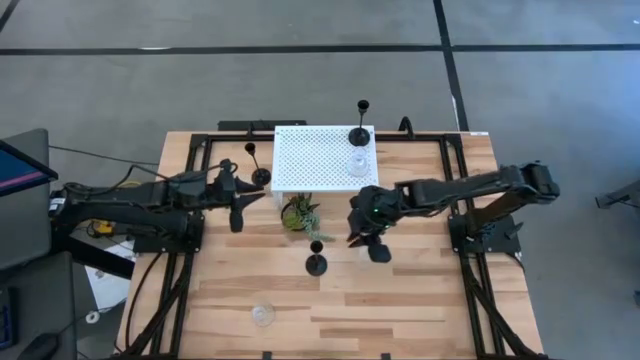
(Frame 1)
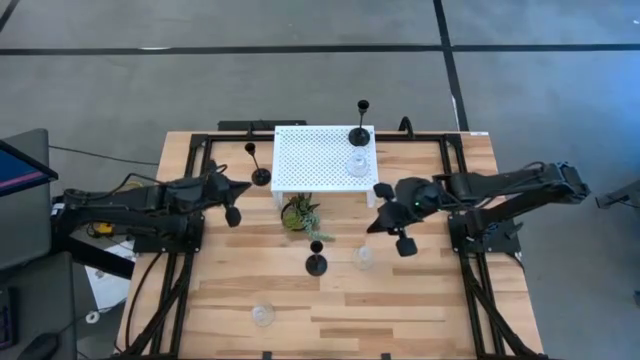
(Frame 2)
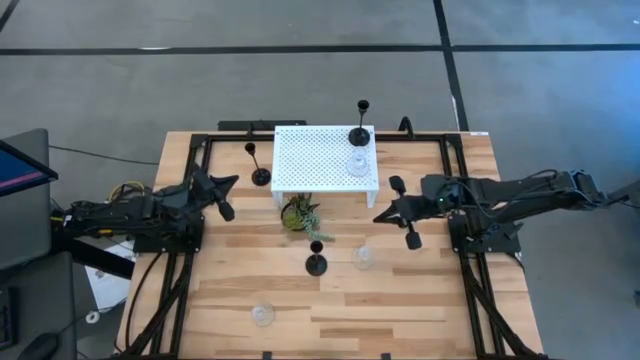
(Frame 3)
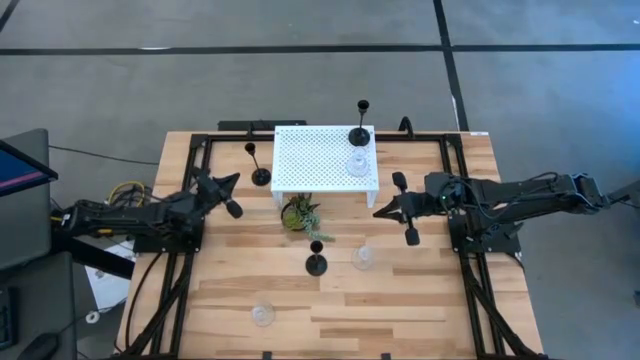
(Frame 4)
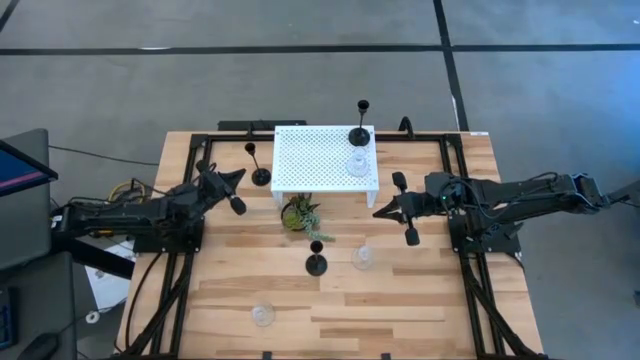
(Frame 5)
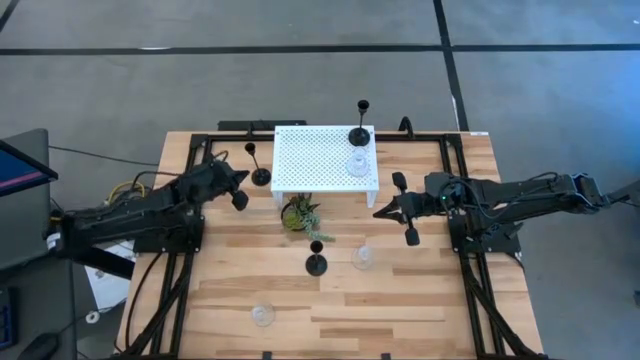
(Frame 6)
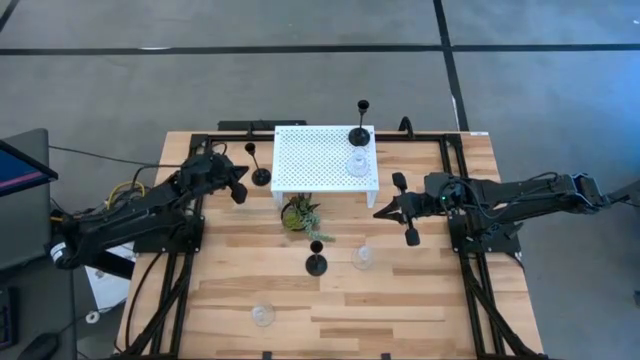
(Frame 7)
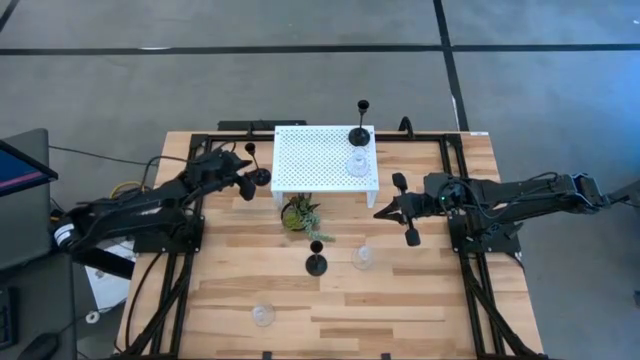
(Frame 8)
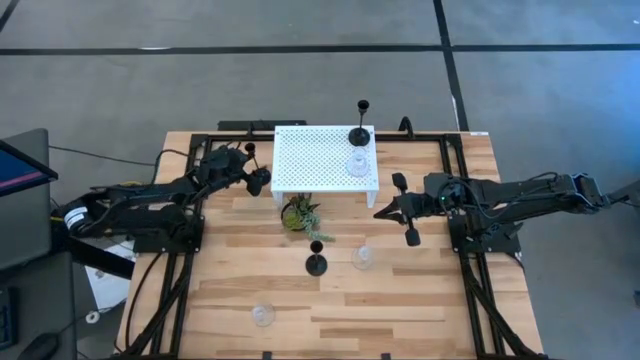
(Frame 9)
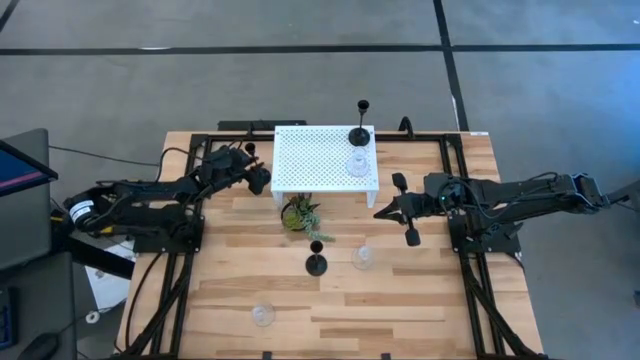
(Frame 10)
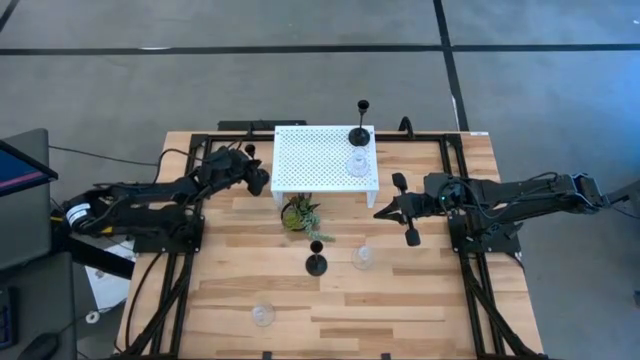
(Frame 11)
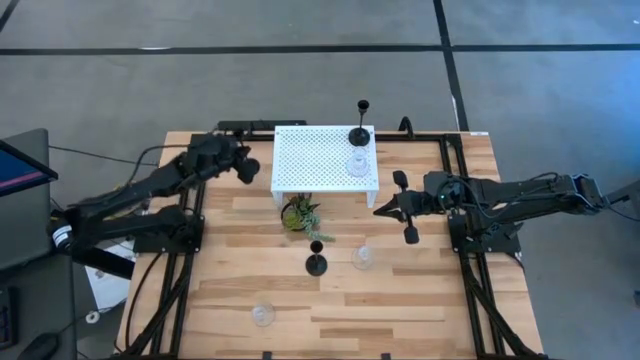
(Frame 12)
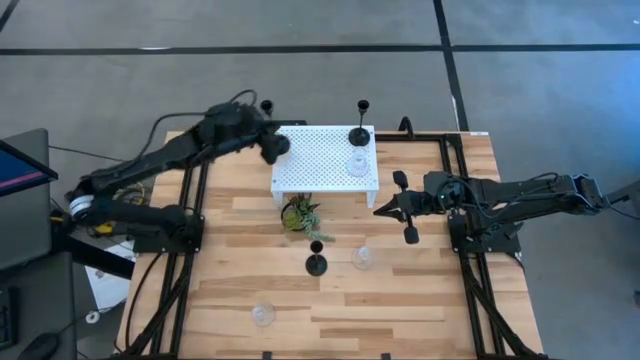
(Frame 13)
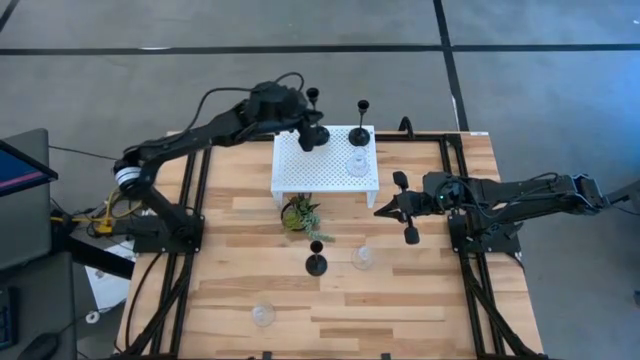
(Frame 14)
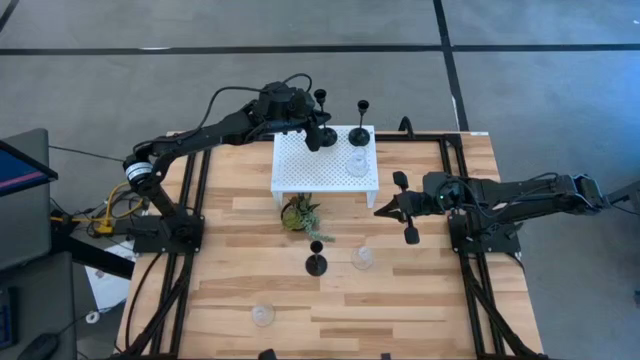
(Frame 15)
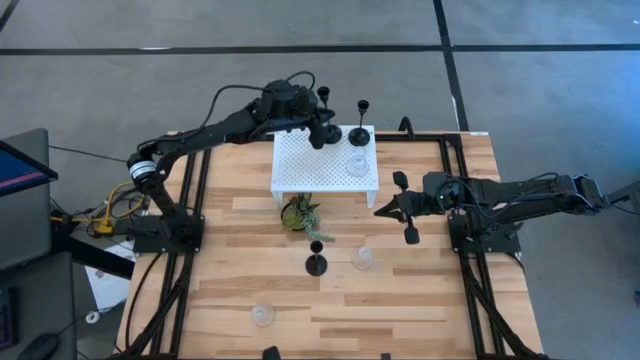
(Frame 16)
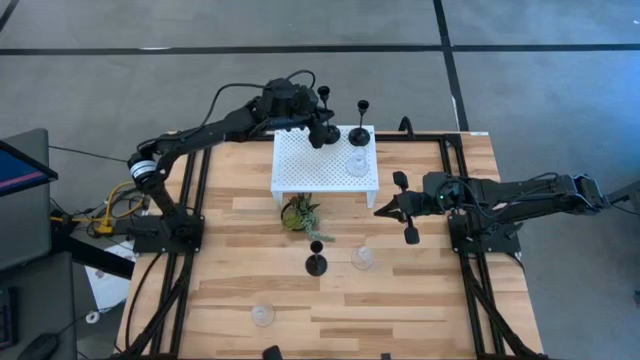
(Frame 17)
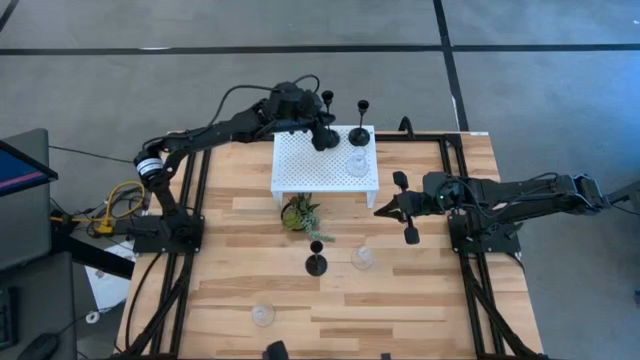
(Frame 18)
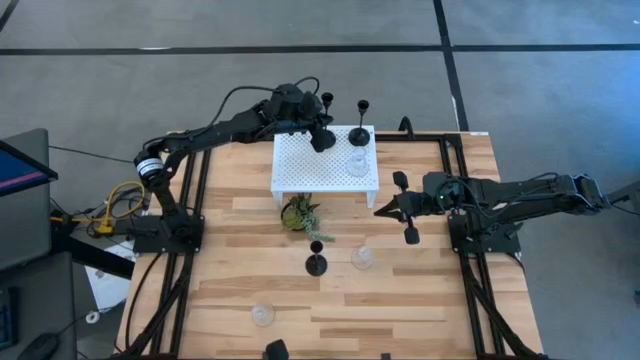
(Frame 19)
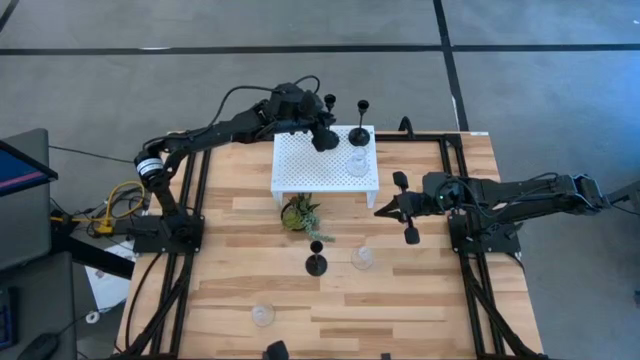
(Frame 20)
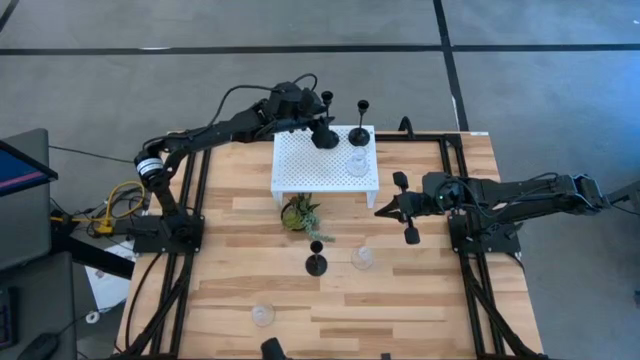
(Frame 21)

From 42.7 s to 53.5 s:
Task: Pick & Place candle stick holders
Put the top black candle holder on the shelf aligned with the black candle holder

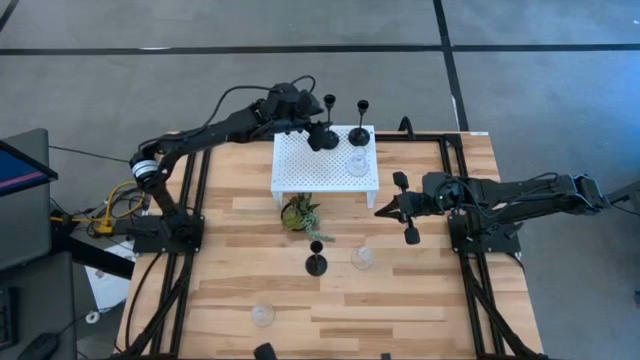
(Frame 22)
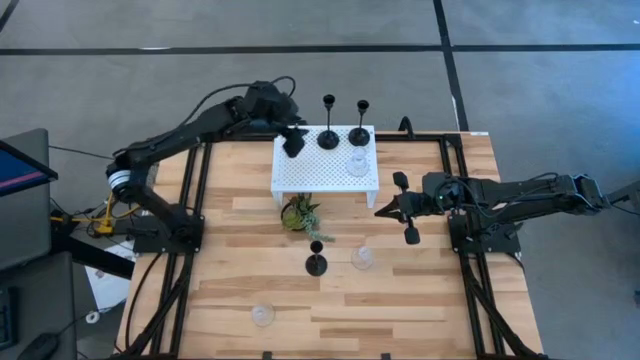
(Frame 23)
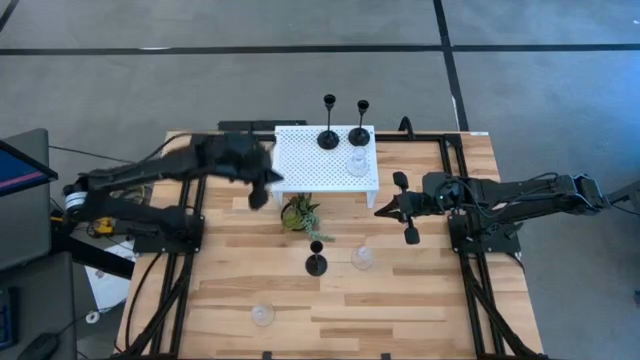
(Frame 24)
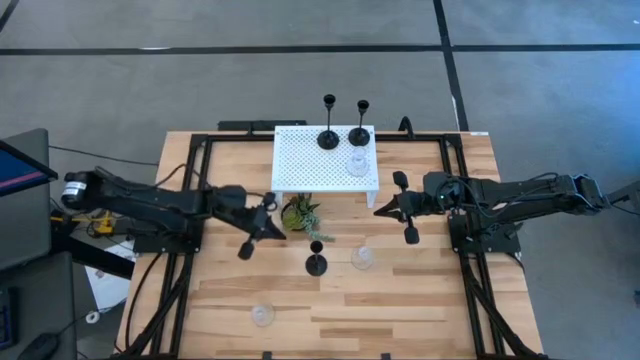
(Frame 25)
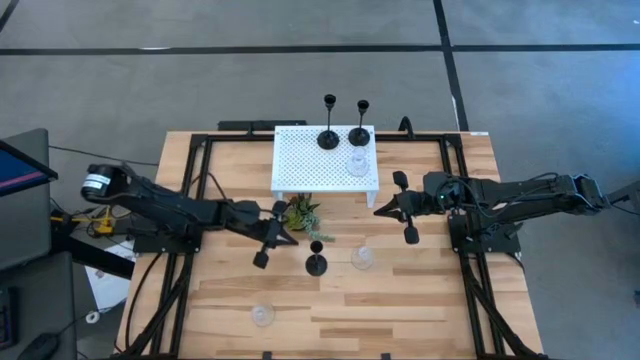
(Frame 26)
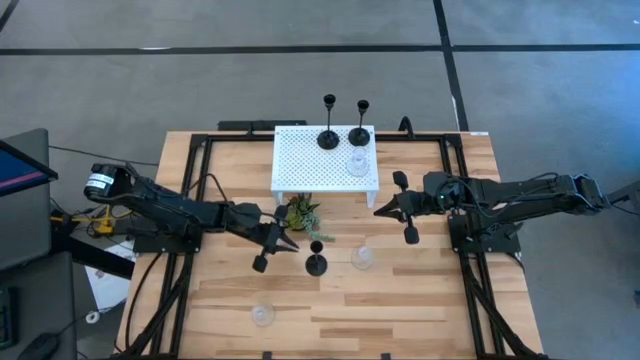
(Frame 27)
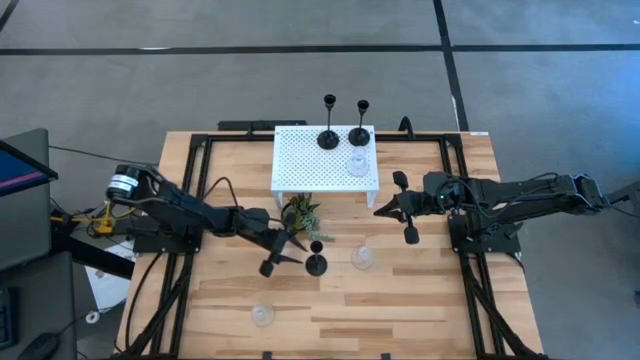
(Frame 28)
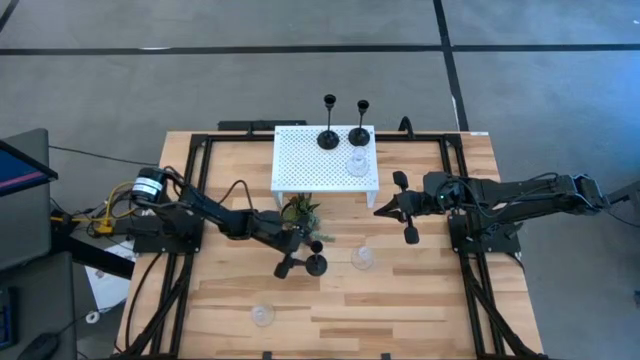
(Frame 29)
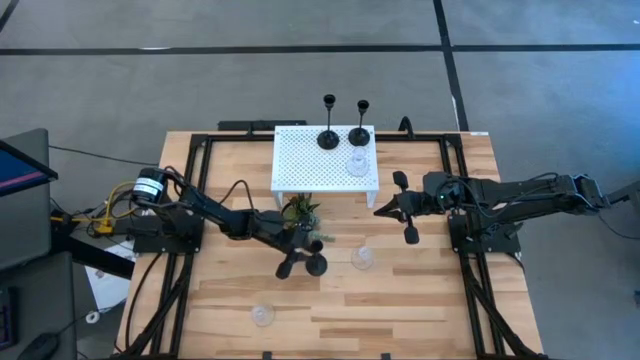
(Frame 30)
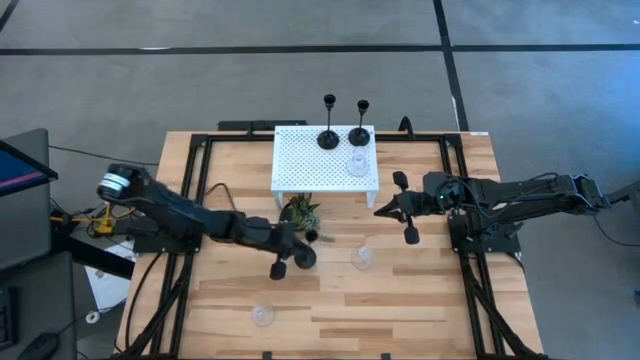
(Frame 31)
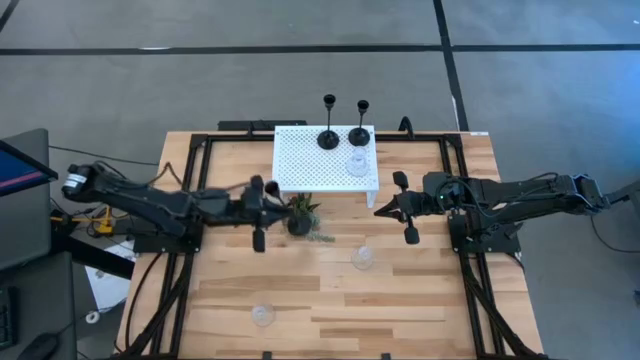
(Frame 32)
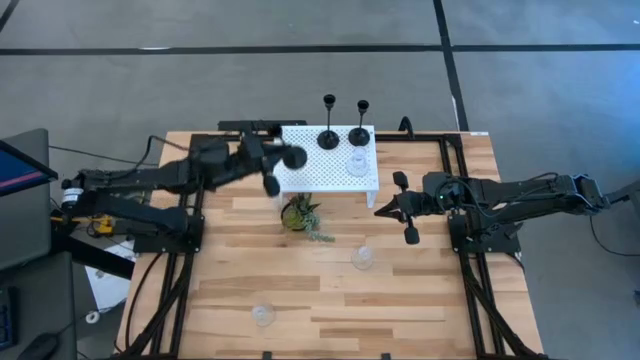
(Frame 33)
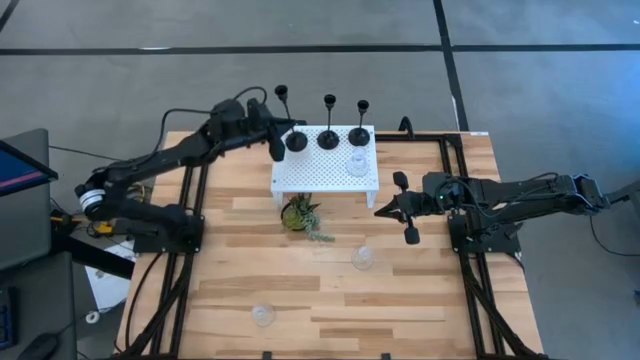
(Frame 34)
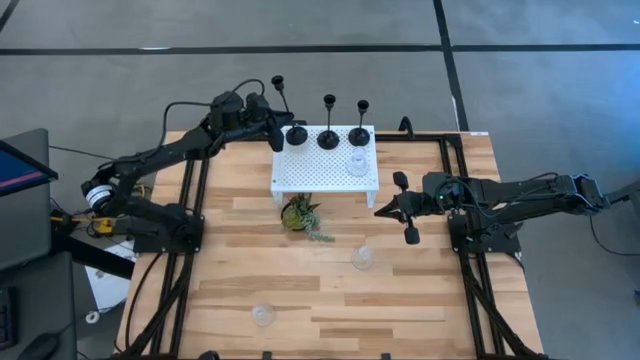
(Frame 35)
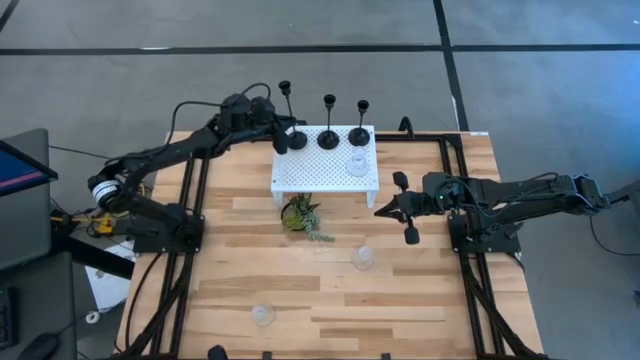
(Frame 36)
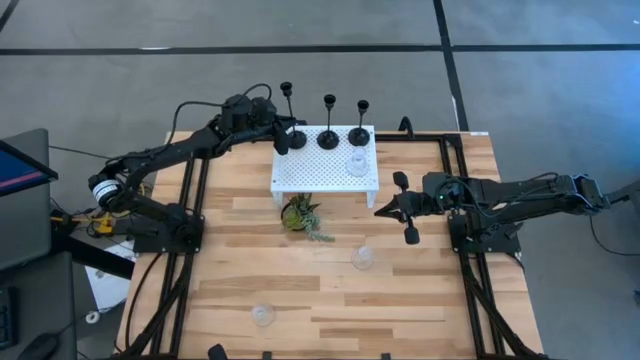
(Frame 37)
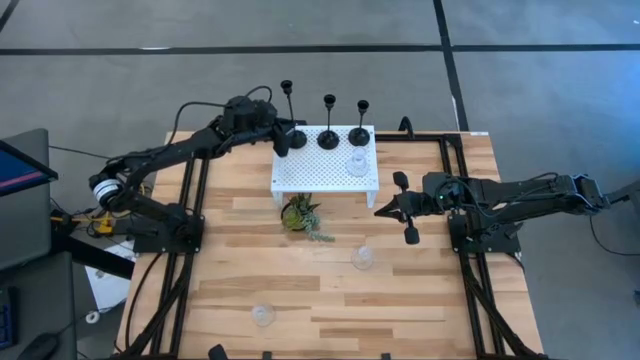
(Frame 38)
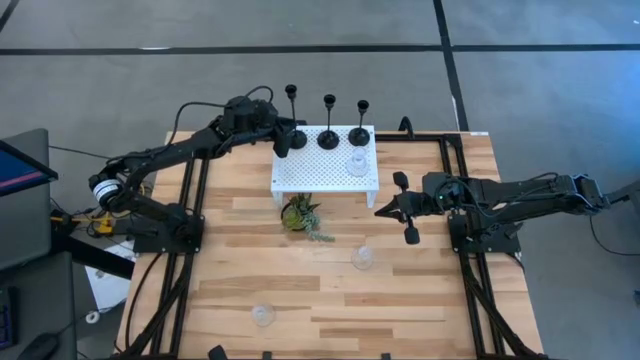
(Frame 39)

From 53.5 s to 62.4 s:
Put the candle holder on the shelf aligned with the black candle holder

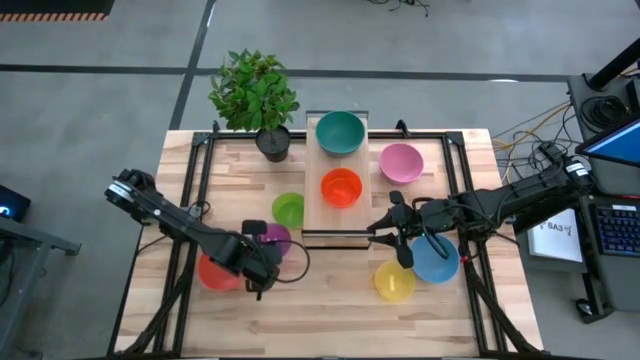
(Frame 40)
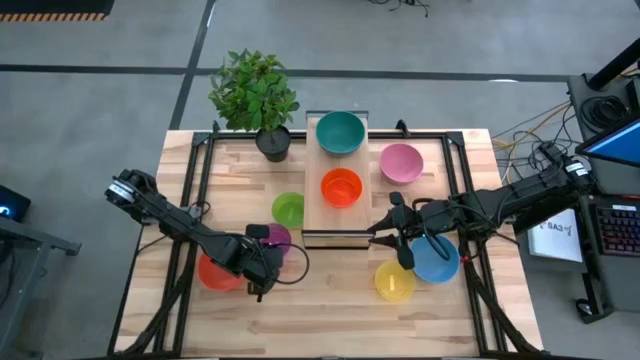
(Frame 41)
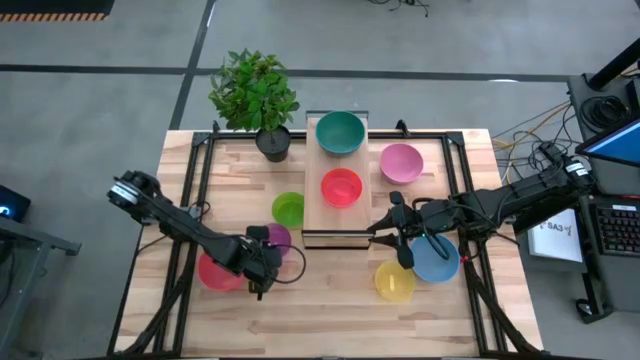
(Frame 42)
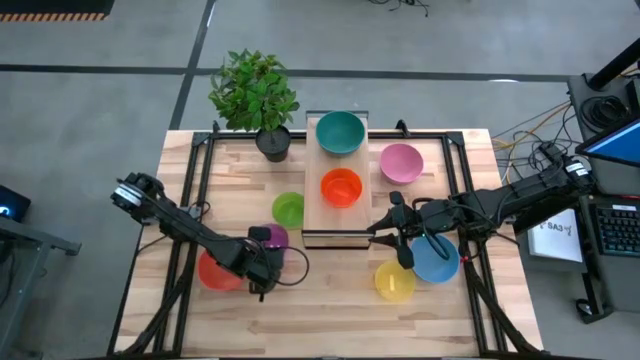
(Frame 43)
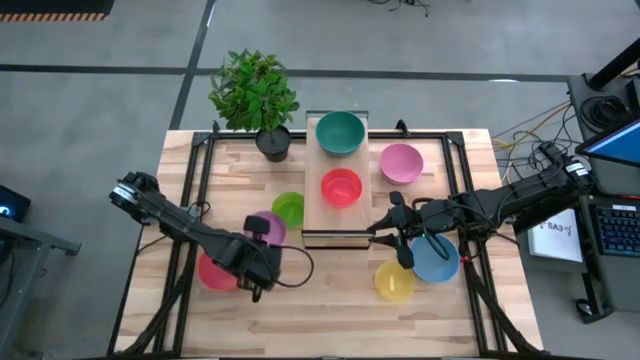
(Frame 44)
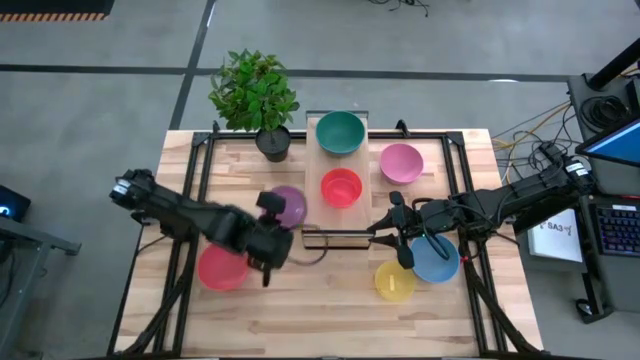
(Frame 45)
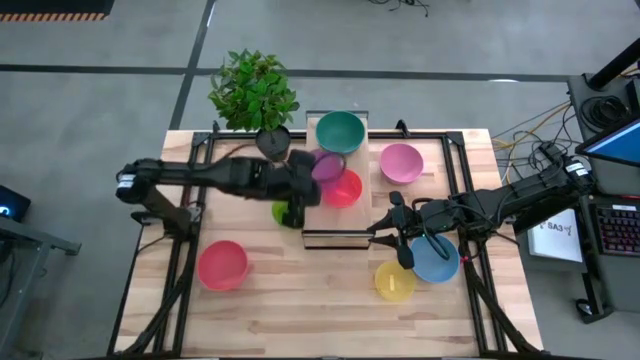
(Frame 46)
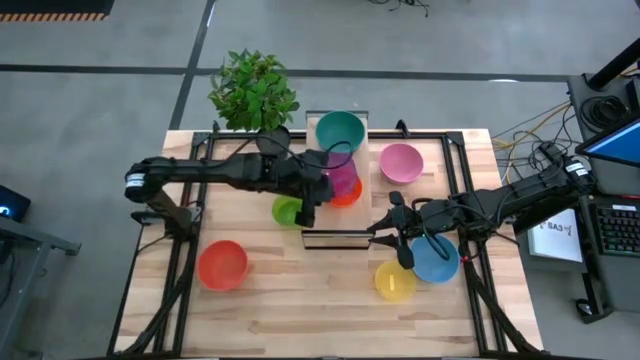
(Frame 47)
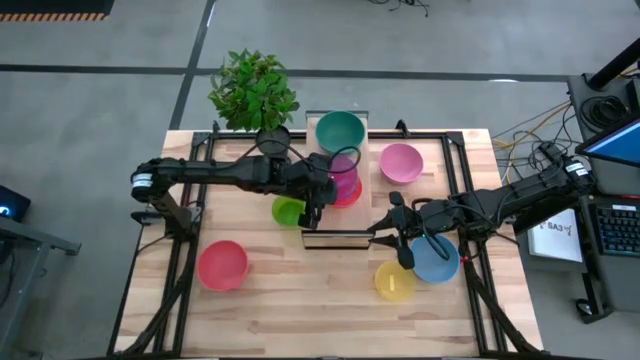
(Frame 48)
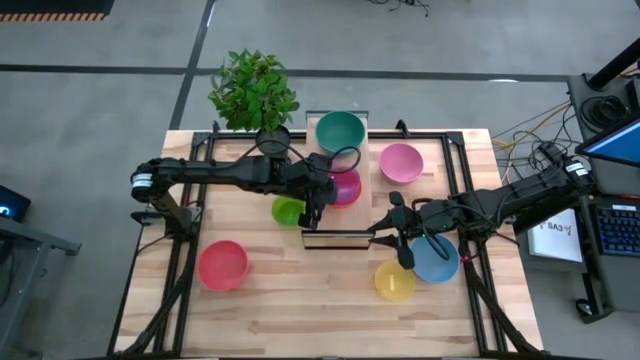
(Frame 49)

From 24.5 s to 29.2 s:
Task: Place and stack bowls onto a shelf
Stack the purple transparent bowl into the orange transparent bowl on the shelf
